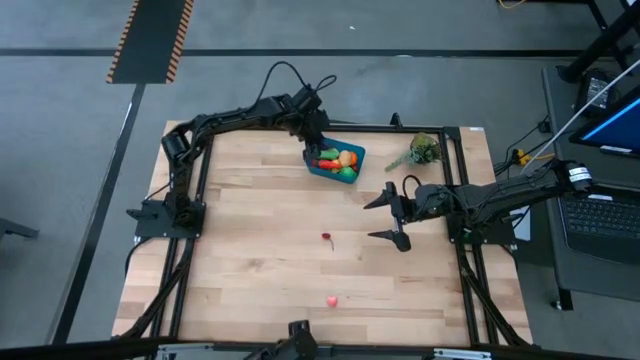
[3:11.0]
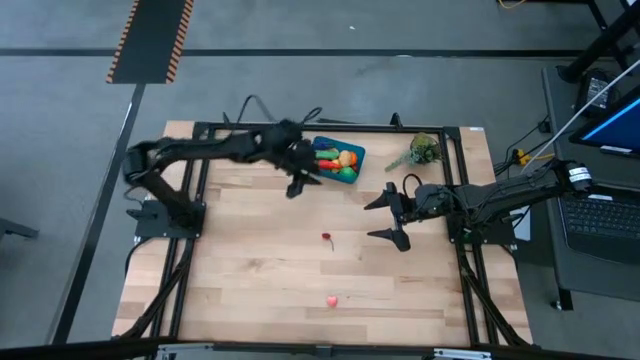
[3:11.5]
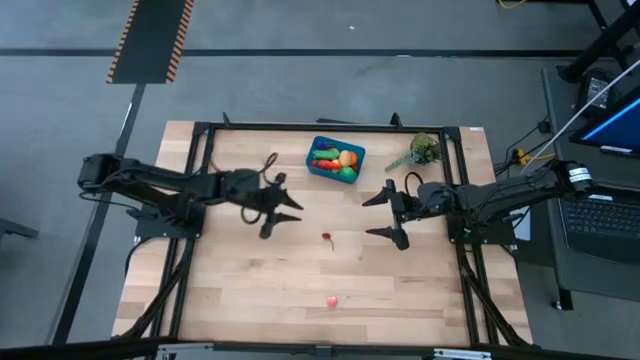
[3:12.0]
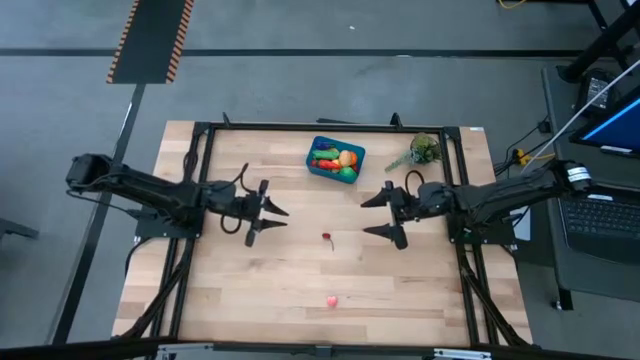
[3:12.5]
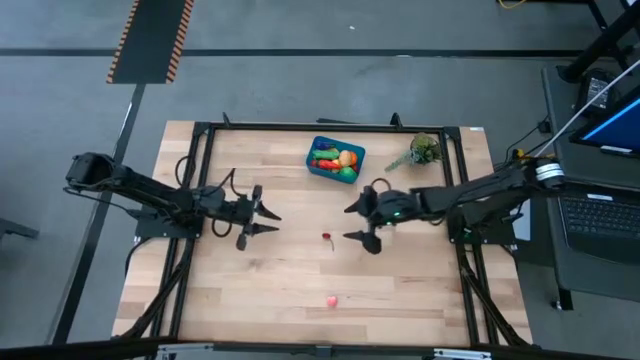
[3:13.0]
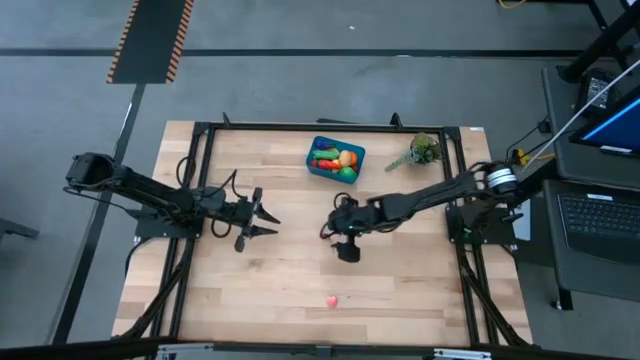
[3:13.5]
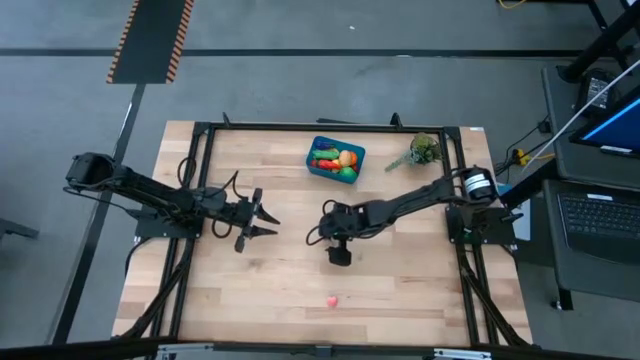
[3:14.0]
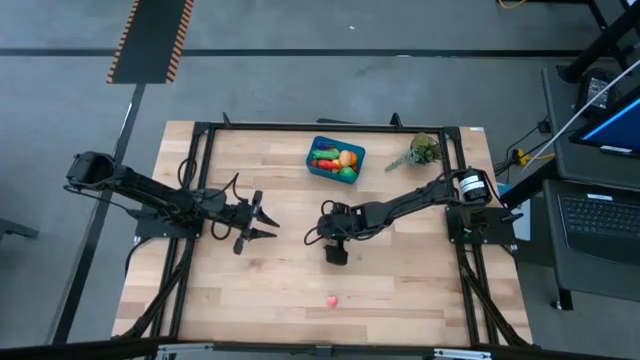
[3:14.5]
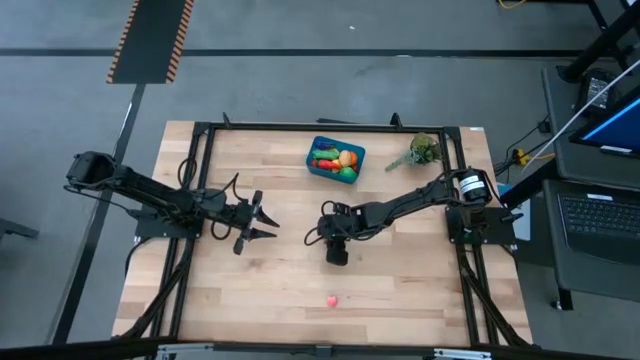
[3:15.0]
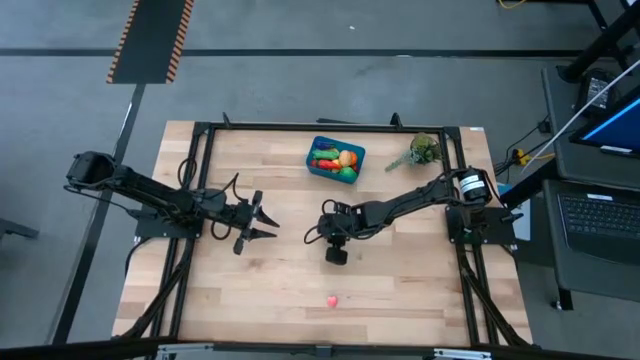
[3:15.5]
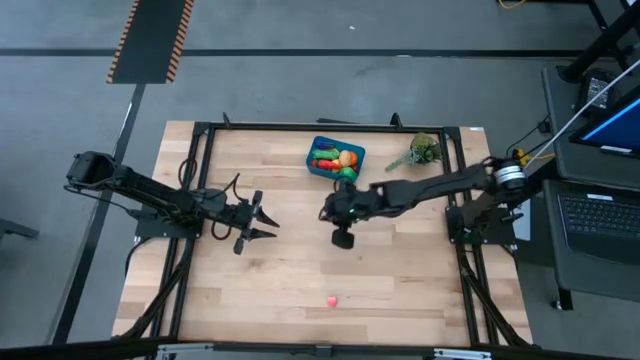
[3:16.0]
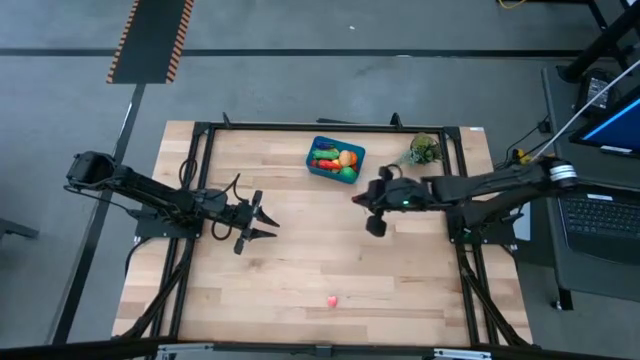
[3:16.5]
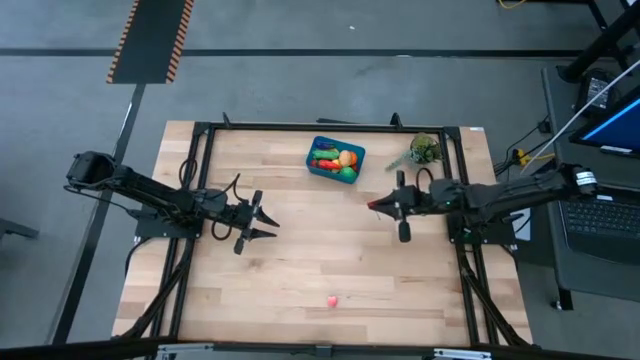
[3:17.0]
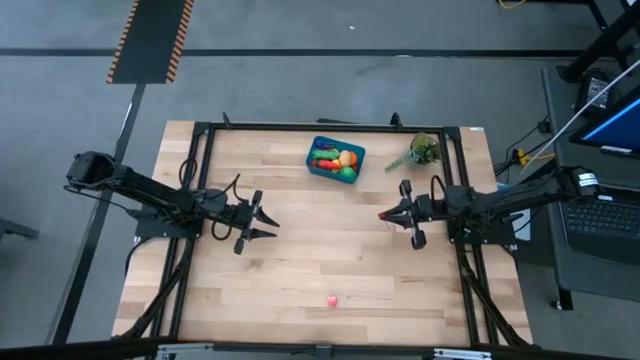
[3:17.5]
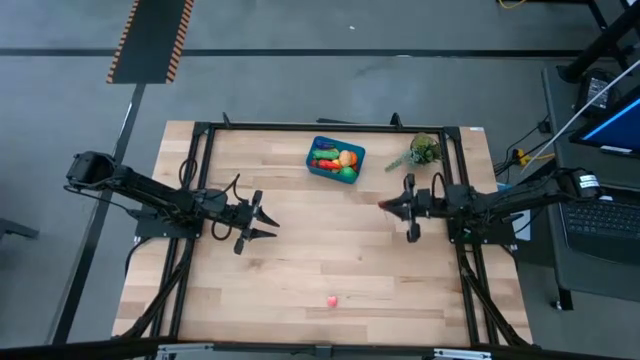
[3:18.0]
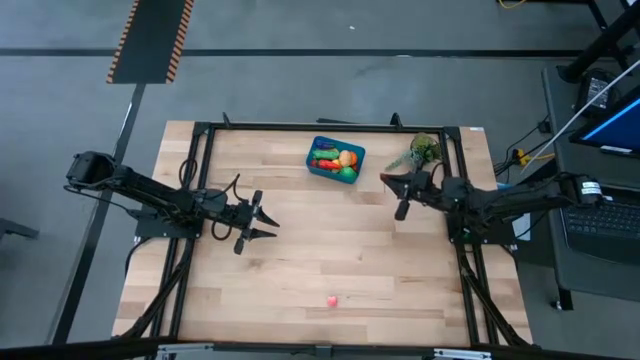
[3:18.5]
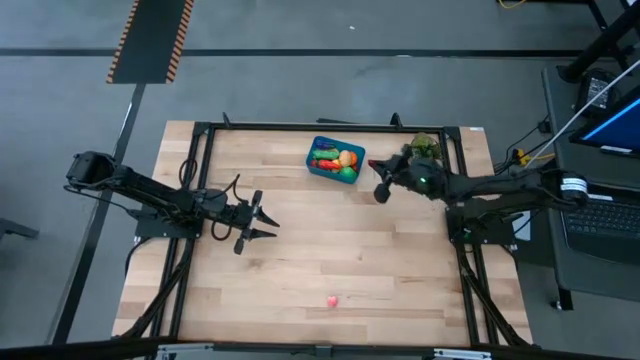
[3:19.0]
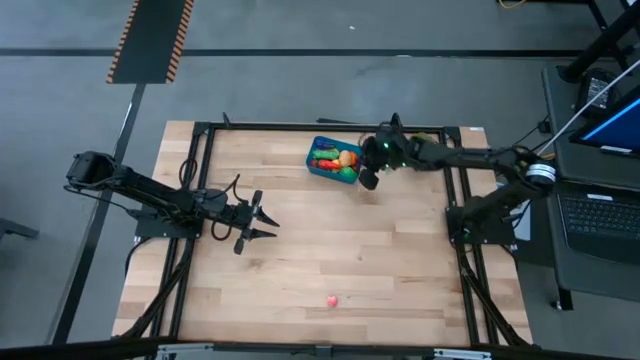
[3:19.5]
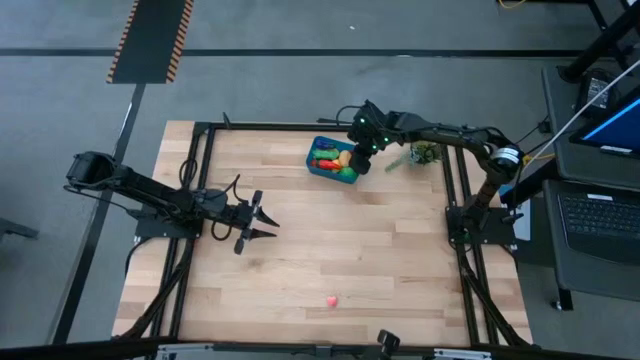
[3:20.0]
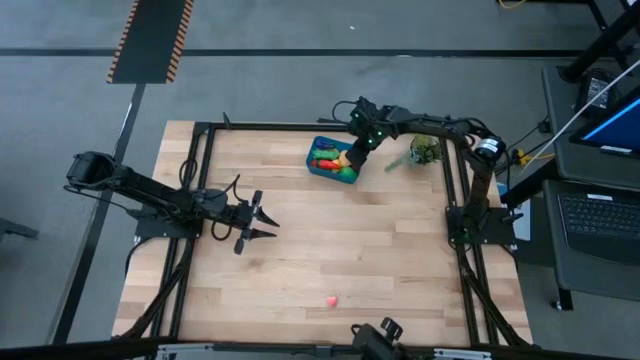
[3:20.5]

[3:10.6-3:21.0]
Task: Pick and placing Produce into tupperware
Put the red cherry into the blue bin
